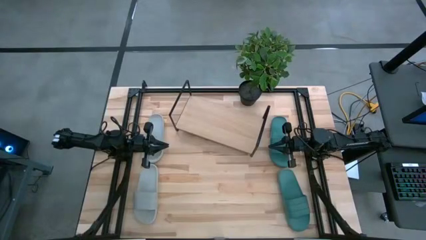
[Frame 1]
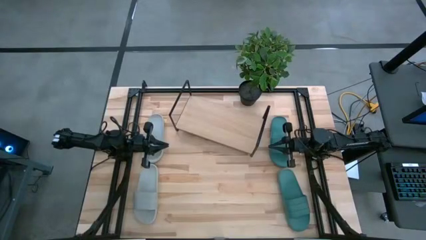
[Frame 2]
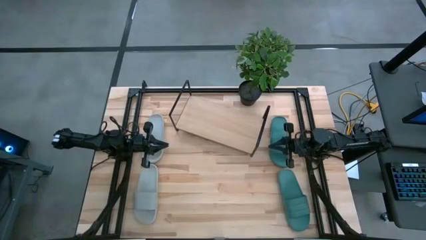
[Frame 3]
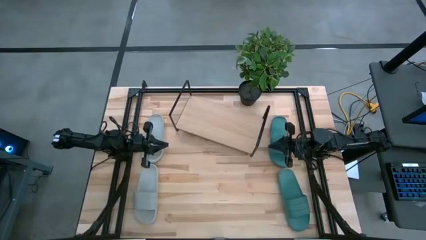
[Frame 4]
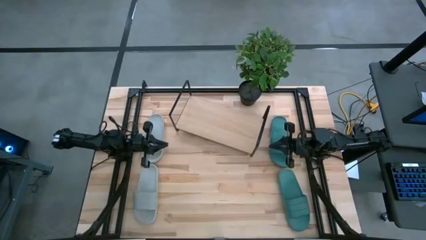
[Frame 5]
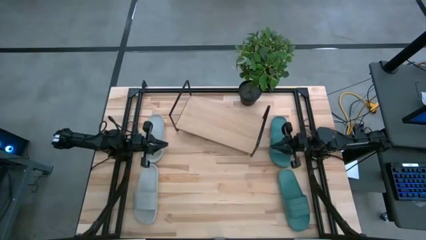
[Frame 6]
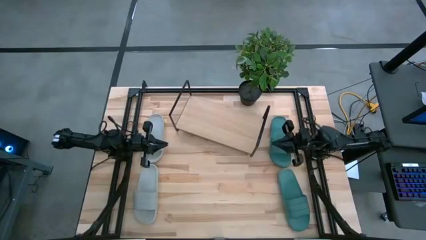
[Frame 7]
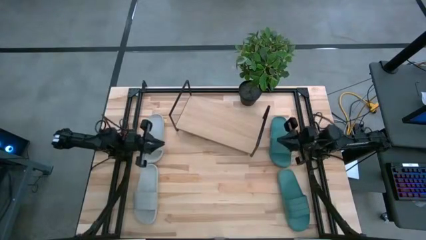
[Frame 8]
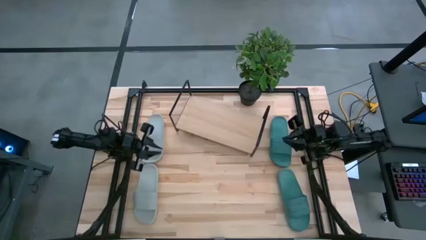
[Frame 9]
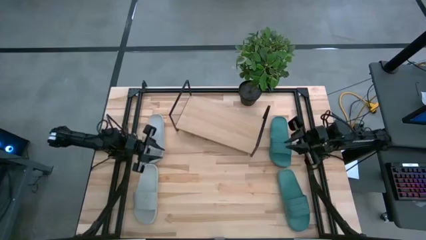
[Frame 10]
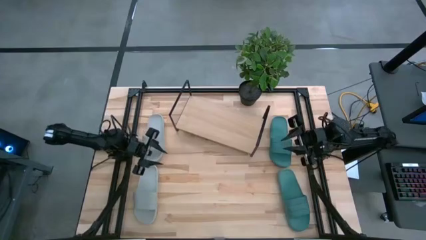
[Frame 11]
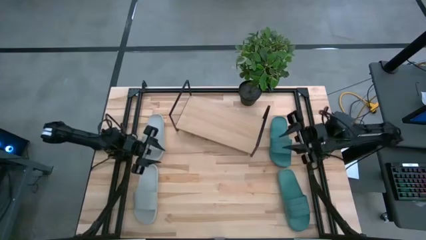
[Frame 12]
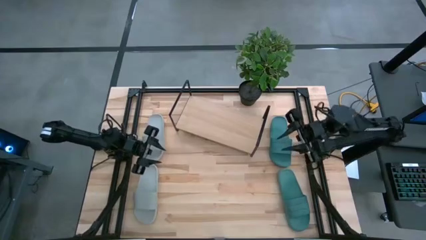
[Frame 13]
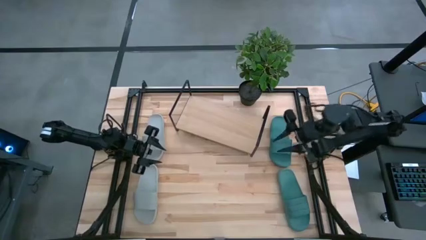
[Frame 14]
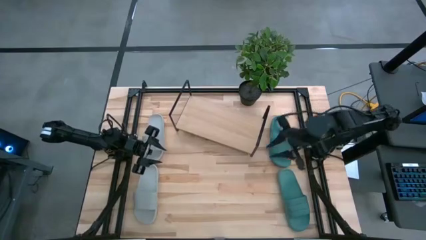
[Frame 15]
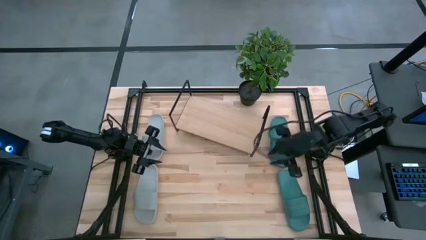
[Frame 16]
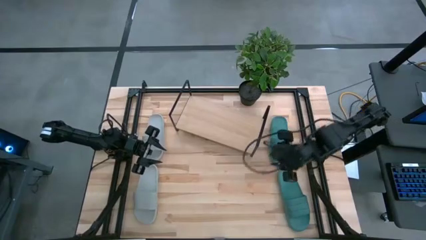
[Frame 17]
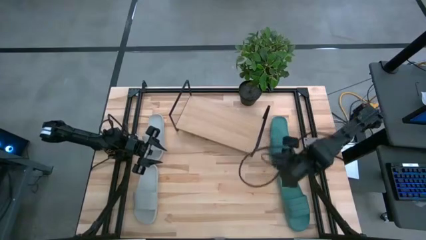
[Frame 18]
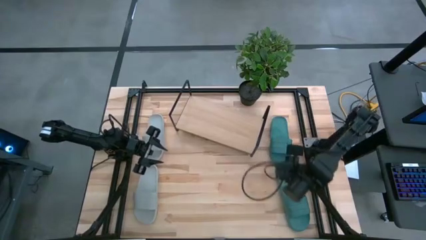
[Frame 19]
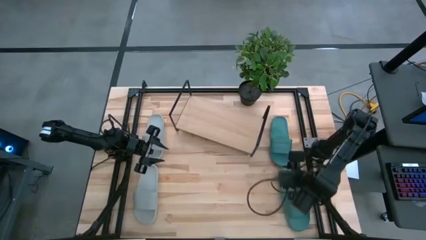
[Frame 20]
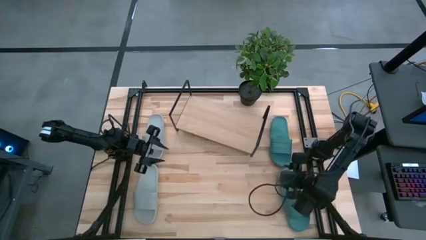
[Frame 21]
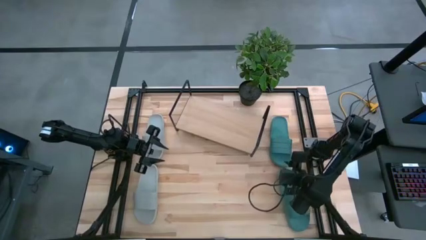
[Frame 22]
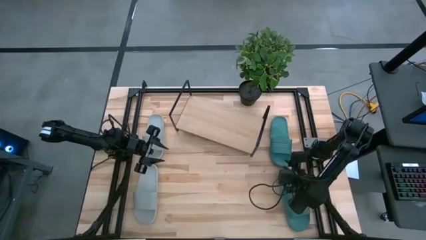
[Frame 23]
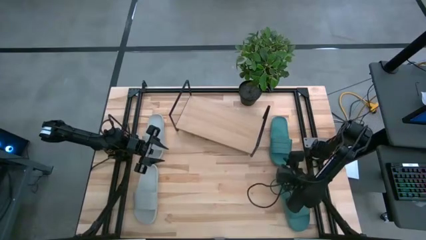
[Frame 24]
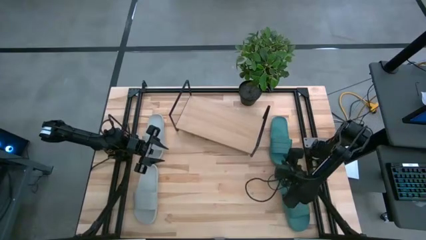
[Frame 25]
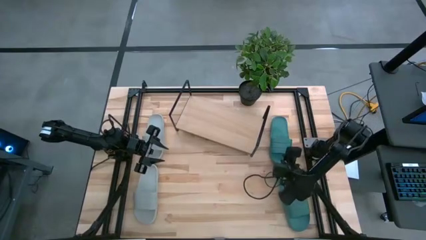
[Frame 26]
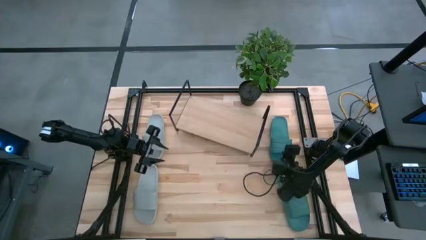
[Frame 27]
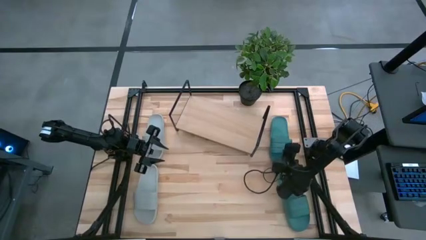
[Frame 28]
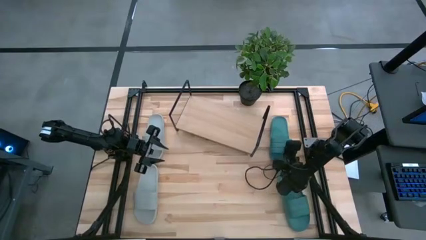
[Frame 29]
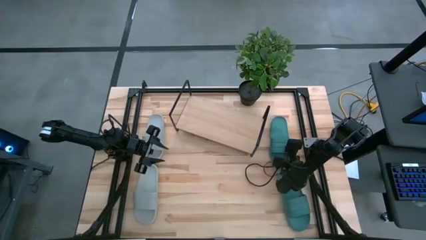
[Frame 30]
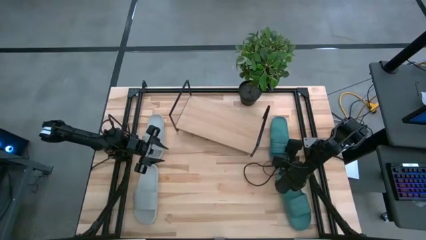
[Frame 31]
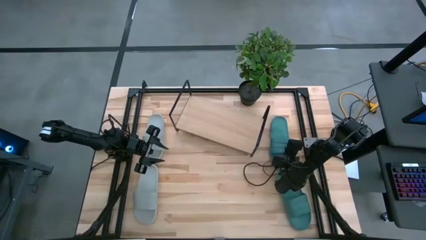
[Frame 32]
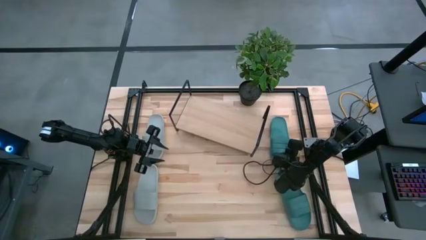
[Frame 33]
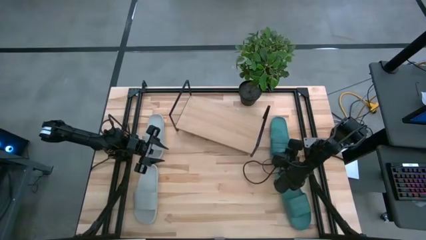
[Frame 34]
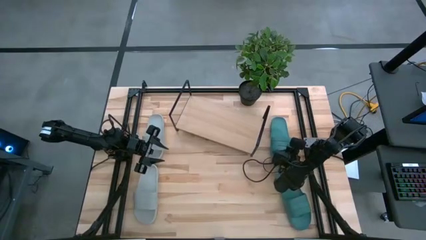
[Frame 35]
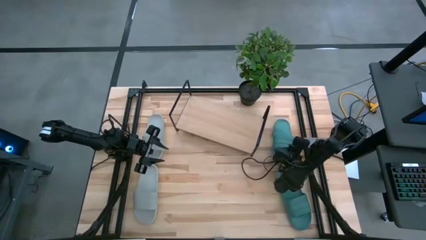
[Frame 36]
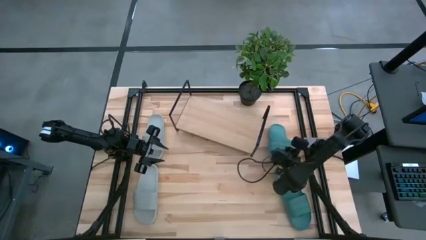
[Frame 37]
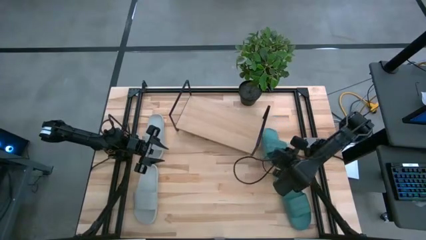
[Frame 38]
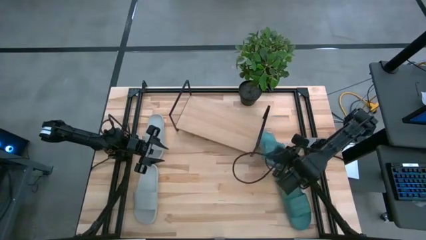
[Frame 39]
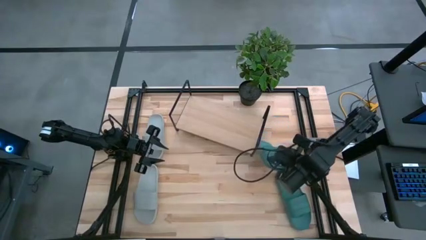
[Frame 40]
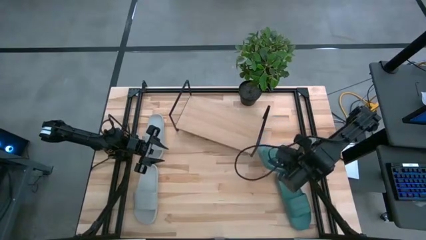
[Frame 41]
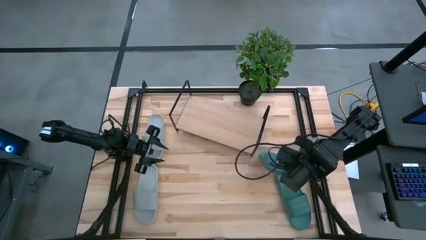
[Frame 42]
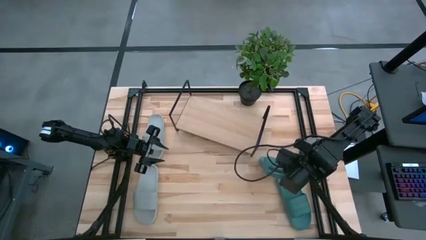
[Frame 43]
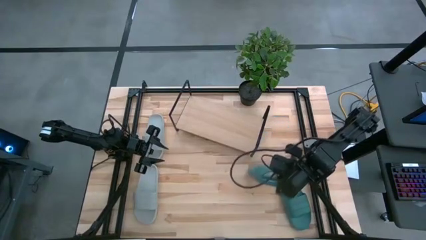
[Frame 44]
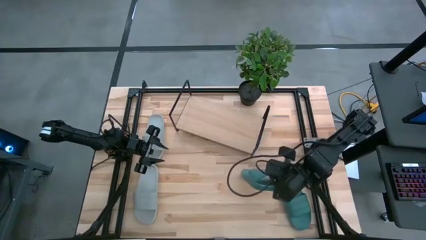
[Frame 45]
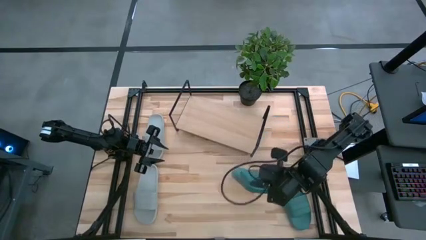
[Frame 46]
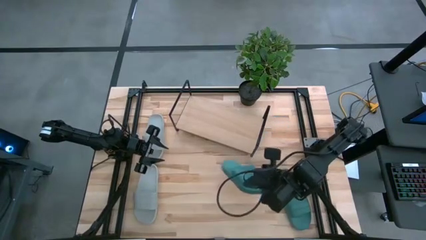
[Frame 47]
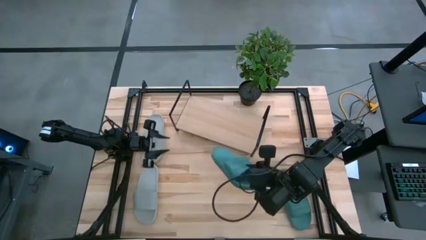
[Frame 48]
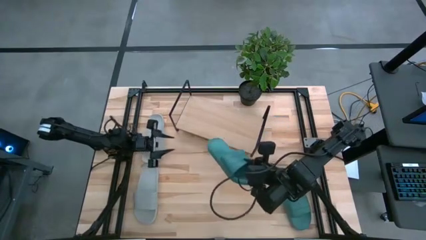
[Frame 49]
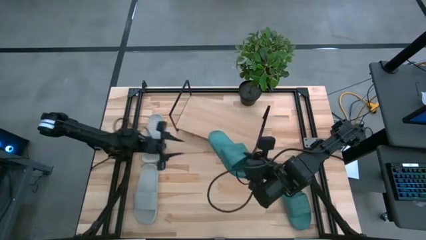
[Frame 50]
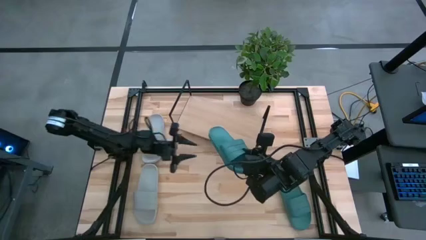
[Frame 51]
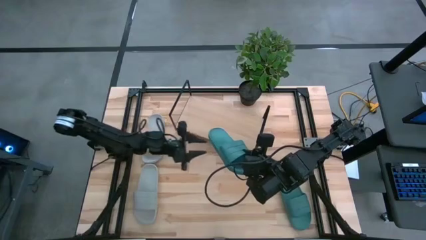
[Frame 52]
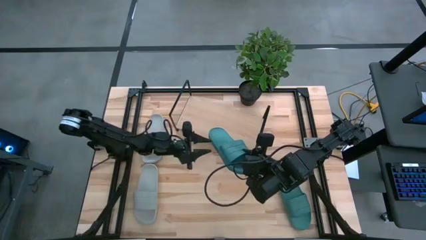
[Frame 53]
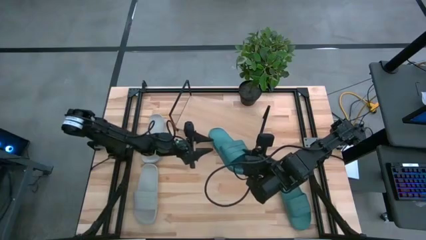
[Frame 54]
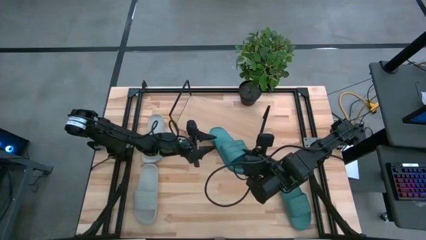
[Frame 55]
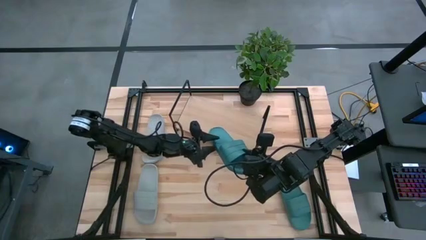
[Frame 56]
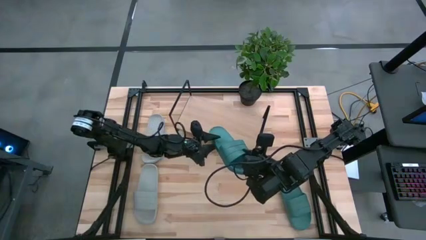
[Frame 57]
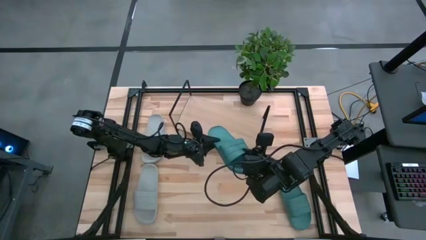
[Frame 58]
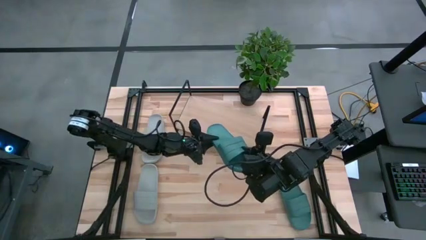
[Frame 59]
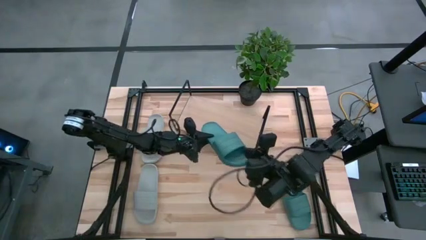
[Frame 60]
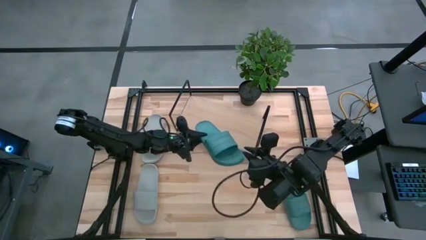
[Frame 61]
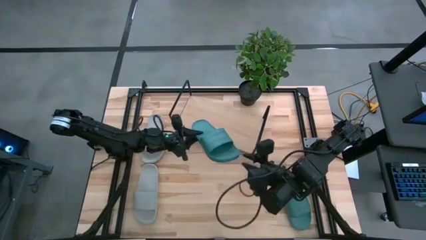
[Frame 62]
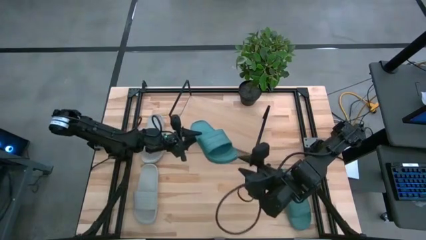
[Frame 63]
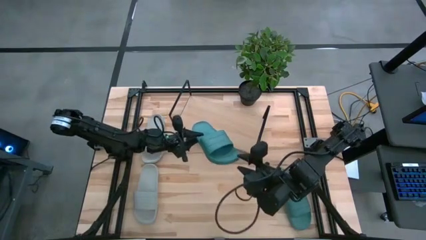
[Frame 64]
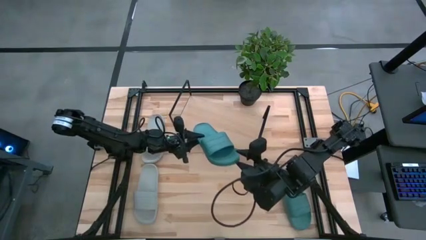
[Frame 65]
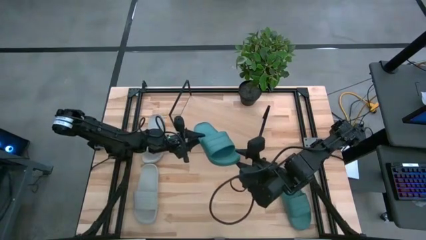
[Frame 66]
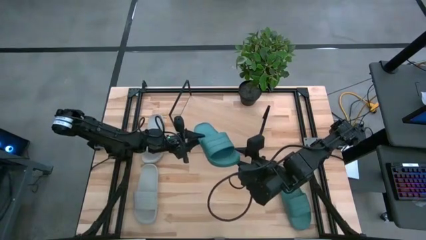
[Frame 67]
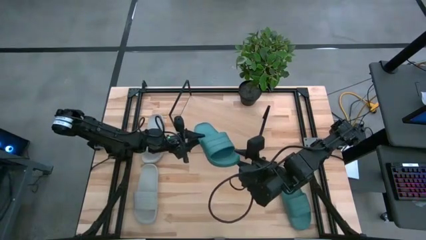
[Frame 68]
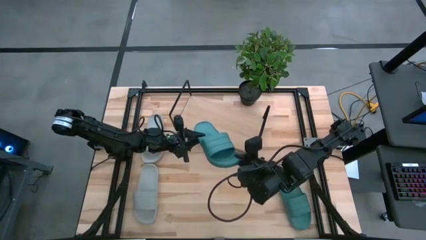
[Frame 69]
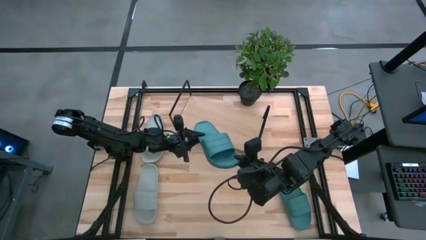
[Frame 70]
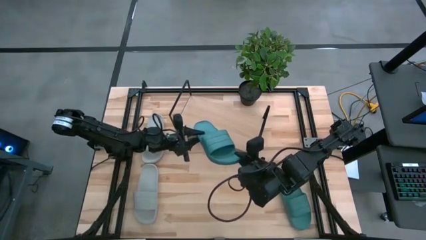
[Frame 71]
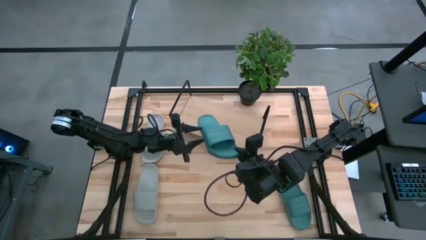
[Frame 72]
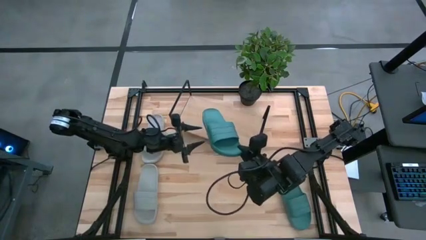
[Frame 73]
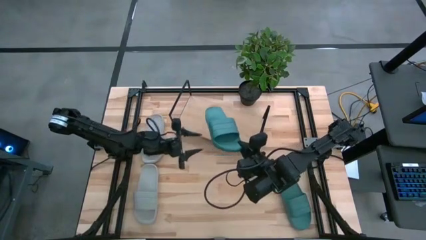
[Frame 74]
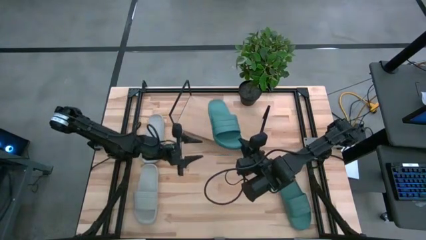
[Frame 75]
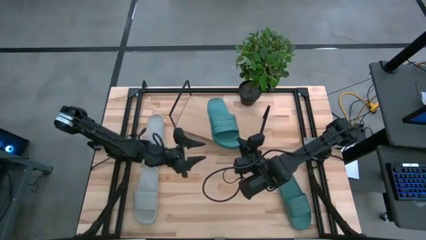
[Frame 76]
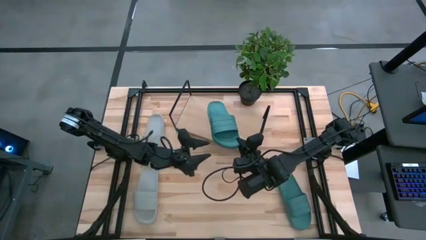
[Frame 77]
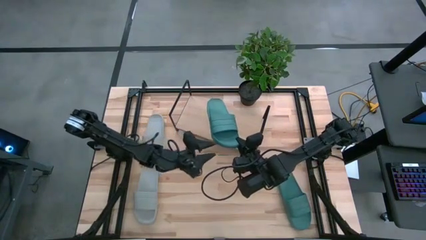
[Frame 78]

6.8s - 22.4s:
Task: Pick and place slides into the shelf
Put the top green slipper on the shelf
